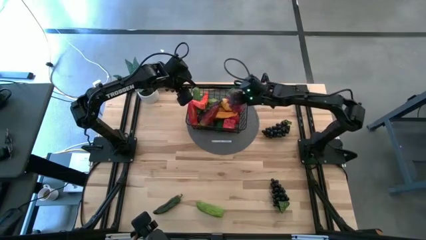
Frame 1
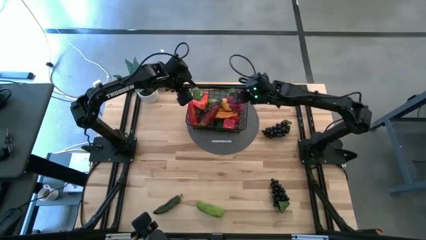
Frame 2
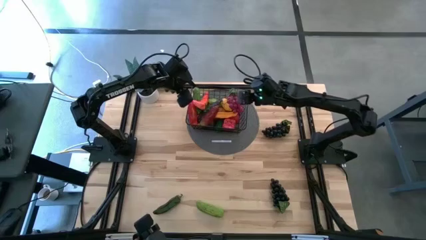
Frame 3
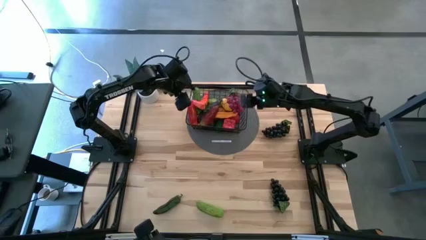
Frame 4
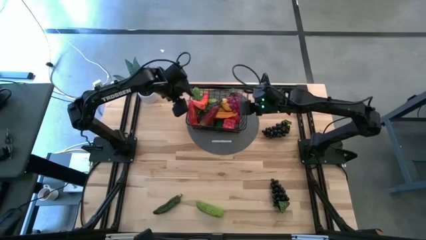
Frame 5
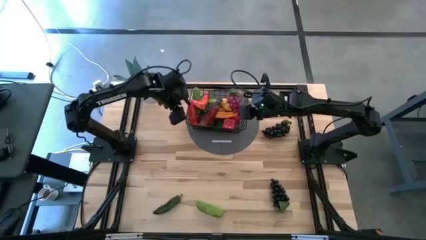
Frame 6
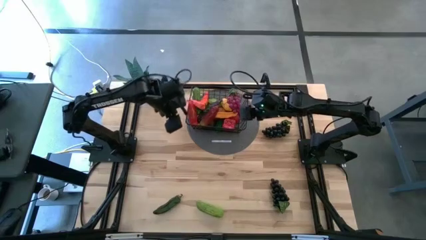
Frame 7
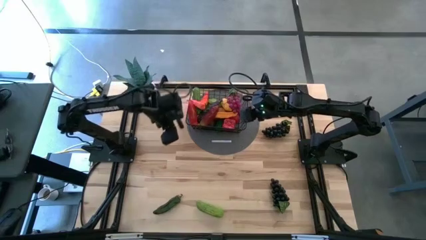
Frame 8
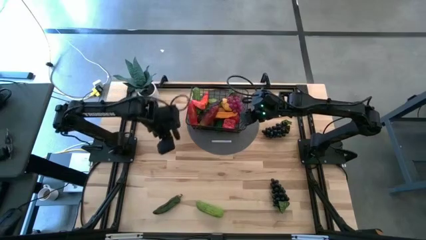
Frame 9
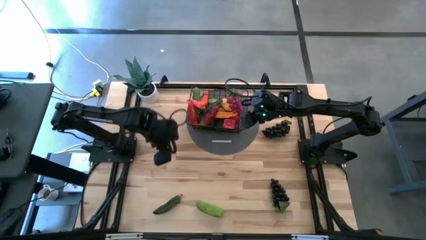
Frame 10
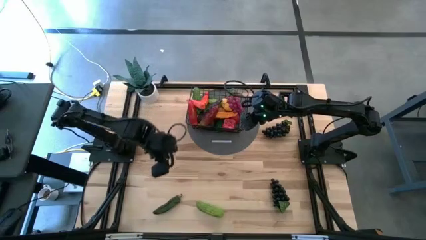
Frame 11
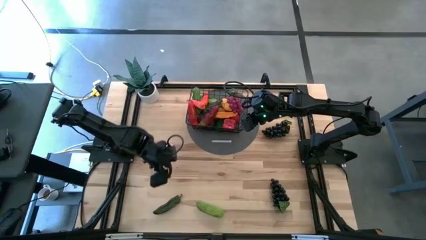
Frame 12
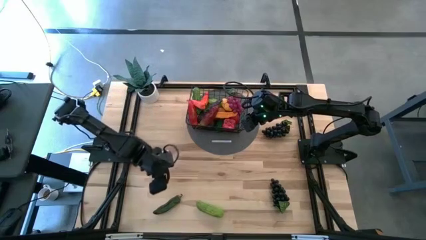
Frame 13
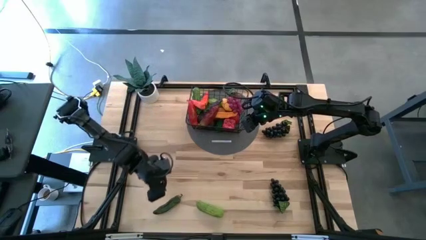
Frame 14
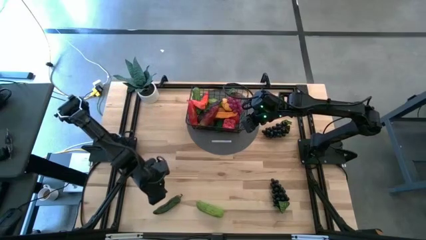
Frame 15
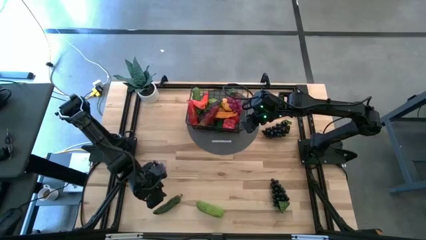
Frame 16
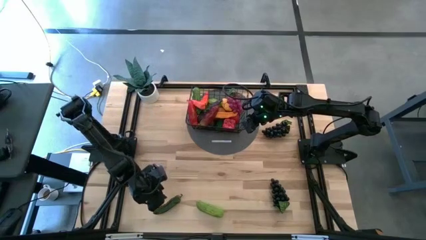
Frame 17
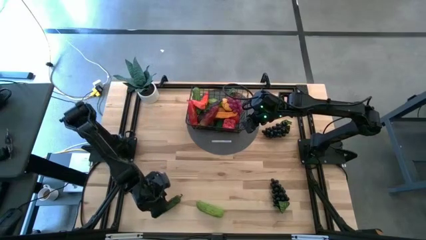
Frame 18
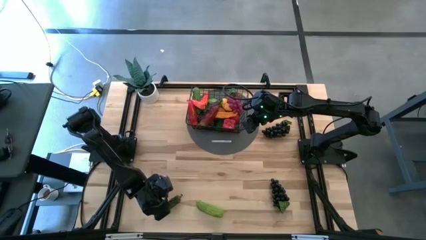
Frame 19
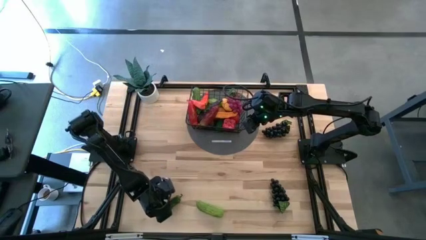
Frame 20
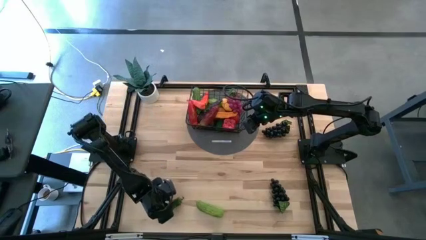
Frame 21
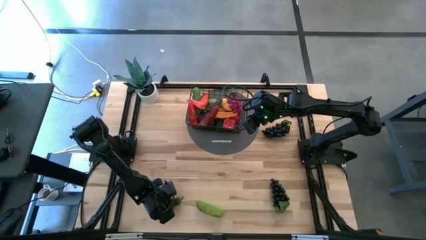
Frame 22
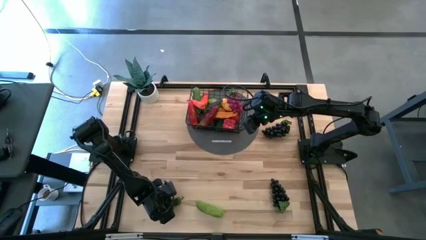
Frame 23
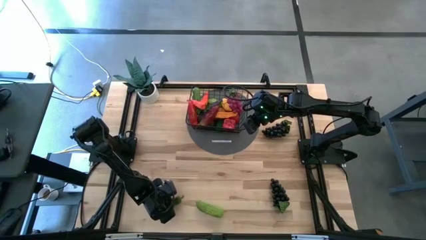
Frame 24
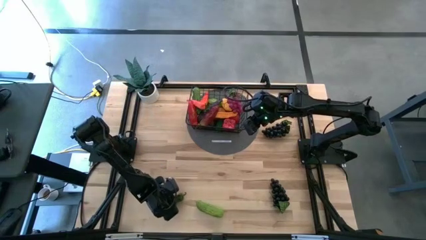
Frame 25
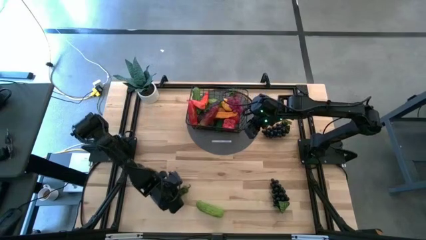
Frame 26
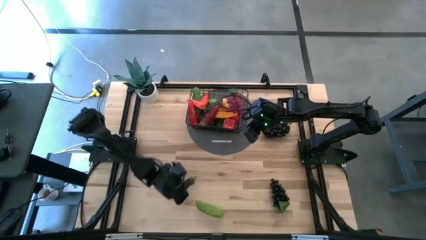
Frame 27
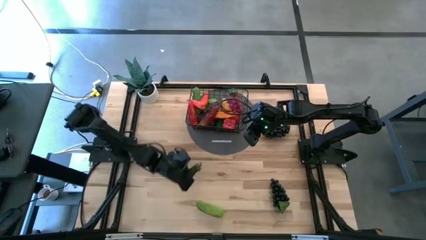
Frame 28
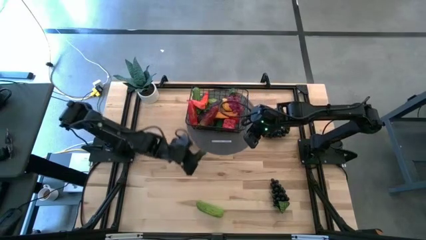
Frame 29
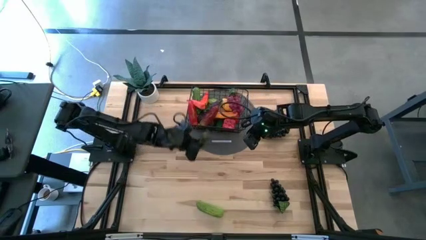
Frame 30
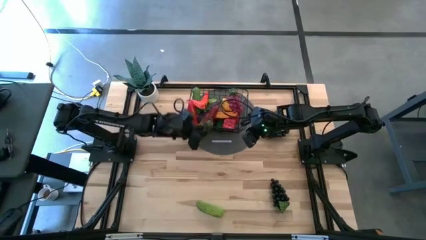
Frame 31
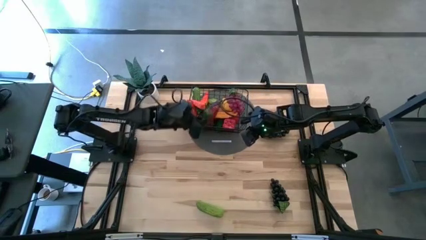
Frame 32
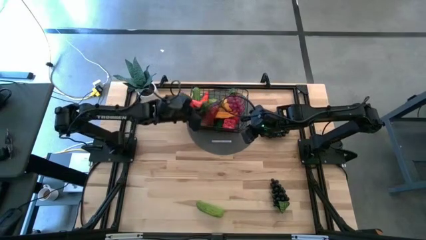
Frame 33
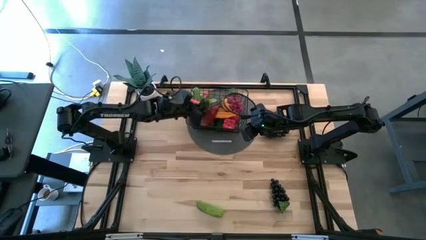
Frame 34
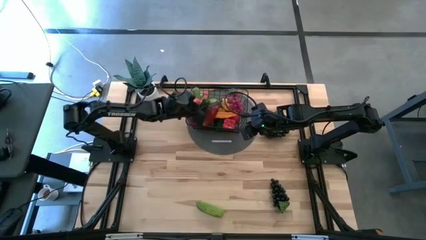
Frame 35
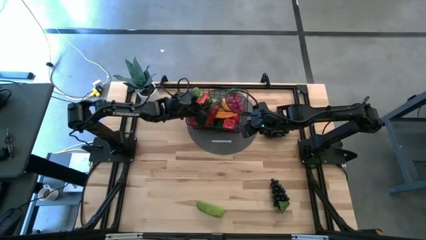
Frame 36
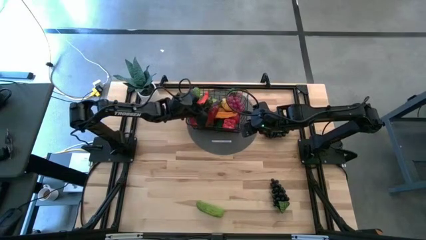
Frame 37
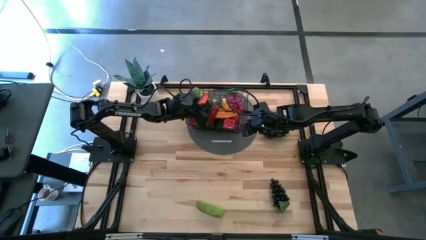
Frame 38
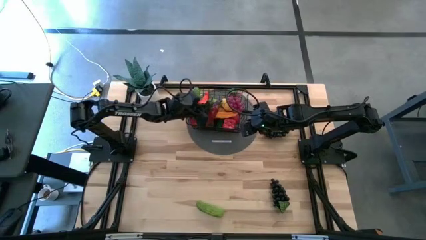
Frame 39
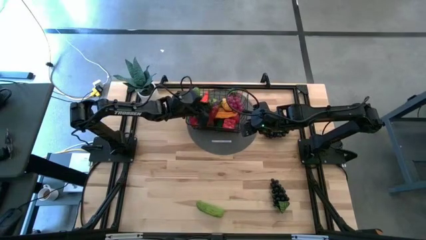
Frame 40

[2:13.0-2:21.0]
Task: Build produce basket
Put the green chili pepper into the wire basket

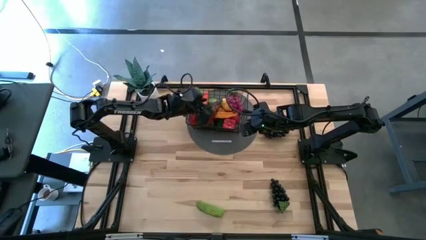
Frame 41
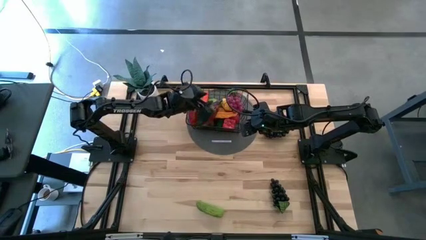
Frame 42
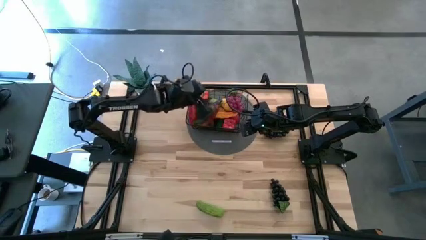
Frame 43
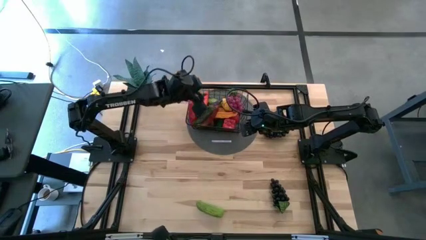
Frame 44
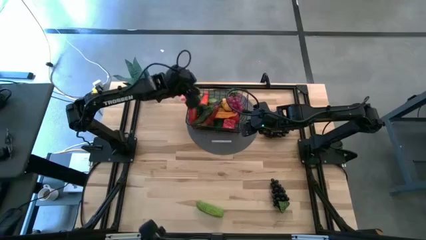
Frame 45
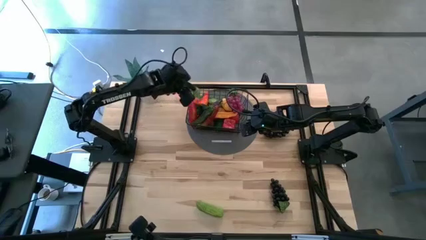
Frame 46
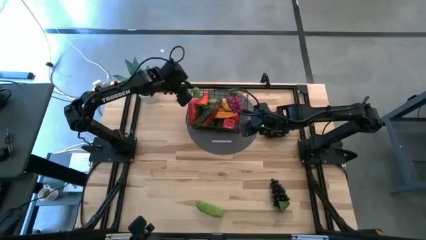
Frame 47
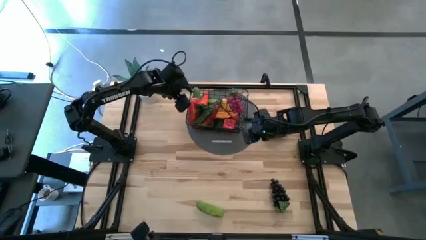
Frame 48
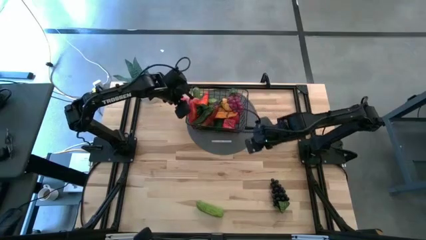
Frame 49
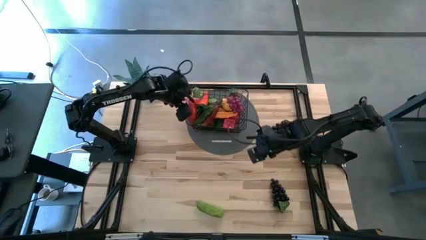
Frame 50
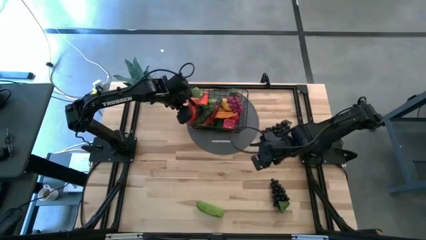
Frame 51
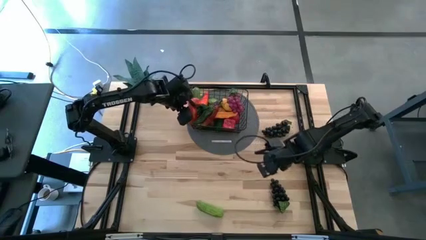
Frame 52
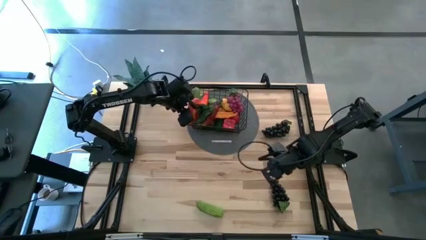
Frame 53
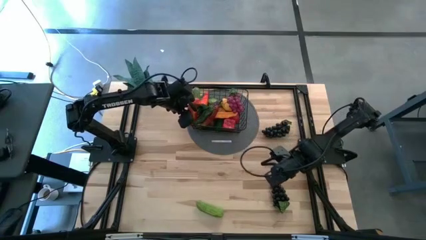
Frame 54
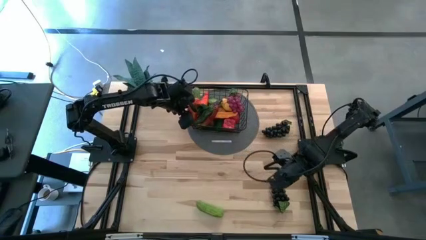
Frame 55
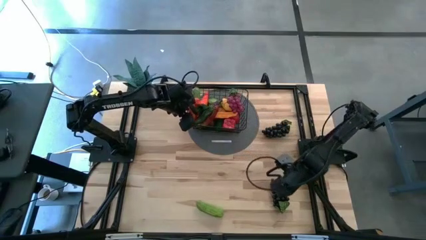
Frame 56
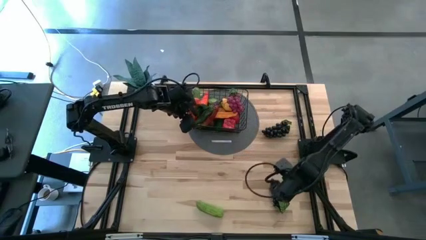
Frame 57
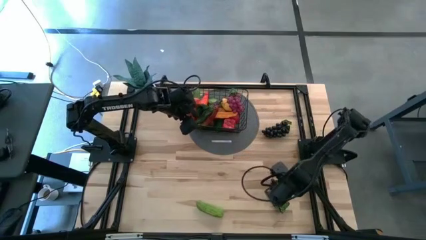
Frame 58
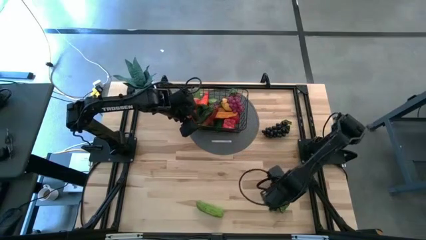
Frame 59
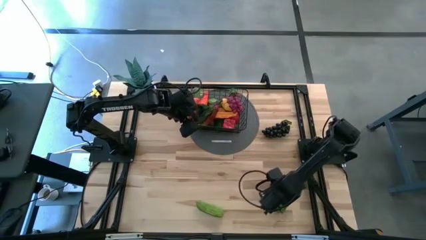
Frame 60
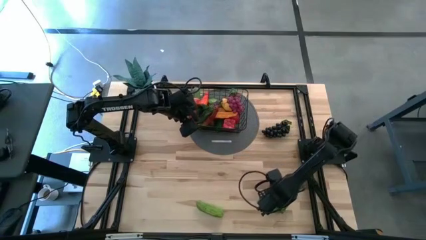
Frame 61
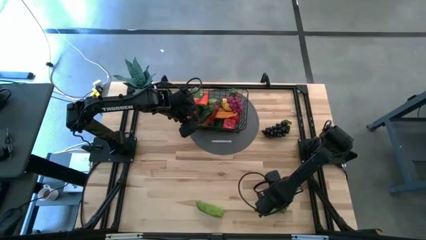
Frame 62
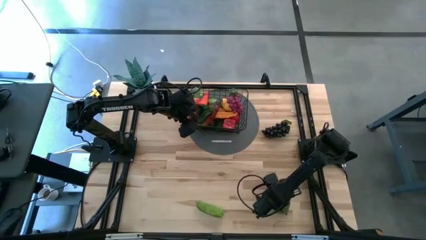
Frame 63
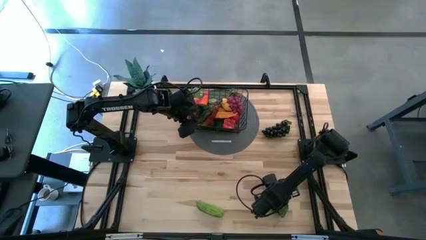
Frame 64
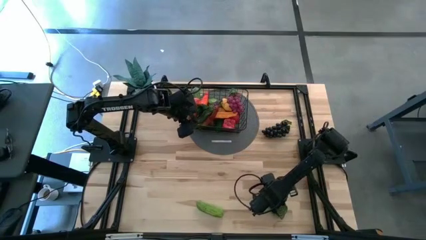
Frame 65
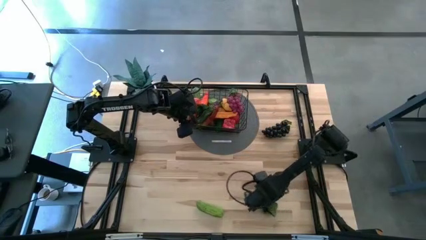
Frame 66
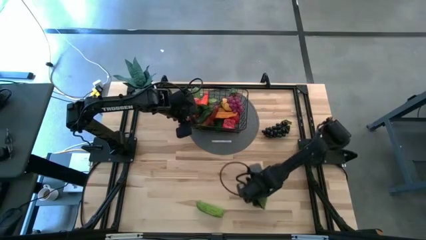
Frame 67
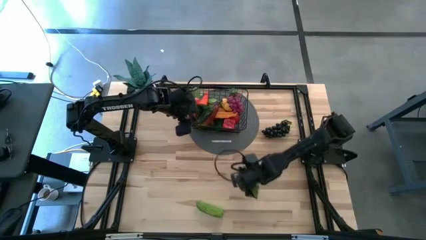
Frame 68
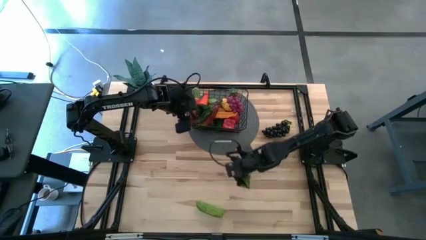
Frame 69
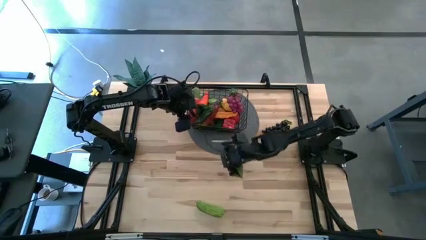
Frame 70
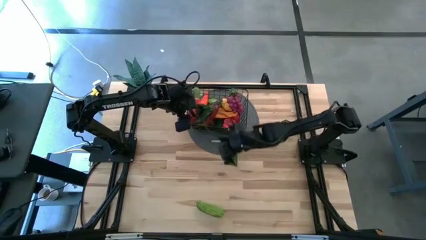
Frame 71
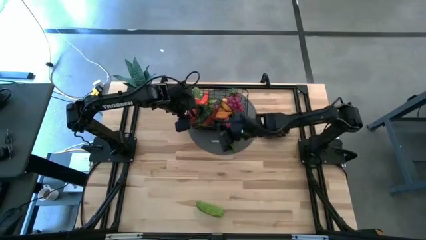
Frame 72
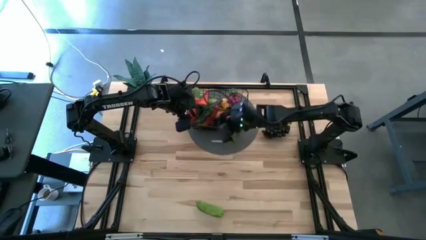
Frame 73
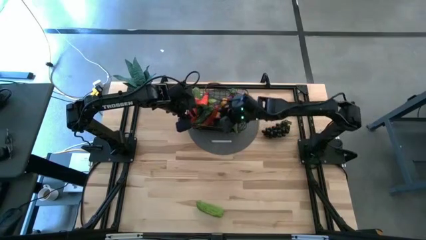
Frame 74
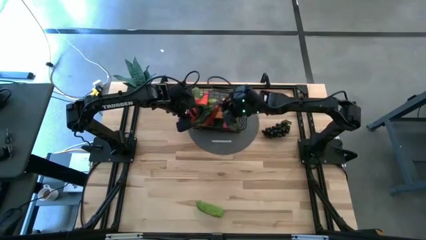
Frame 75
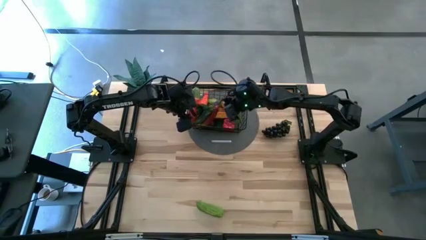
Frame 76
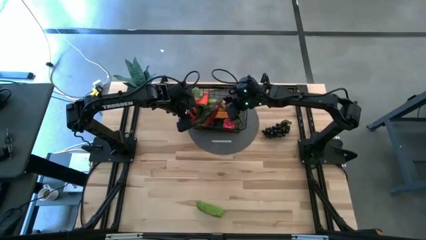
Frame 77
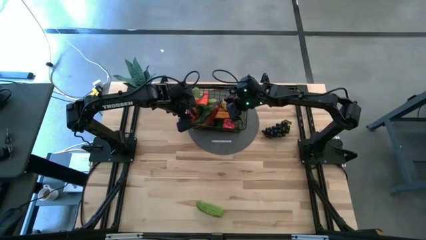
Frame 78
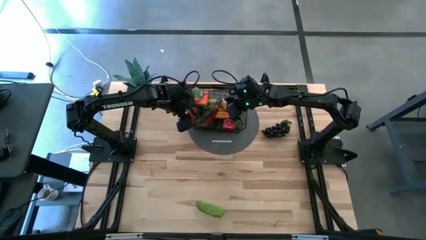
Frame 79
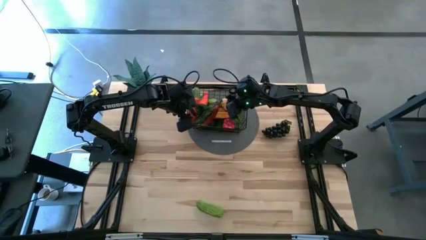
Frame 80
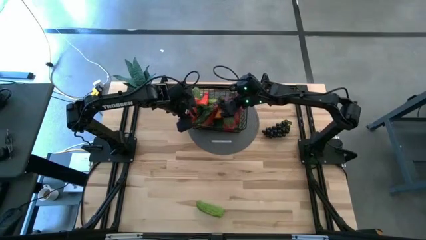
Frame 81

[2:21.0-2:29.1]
Put the bottom black grapes into the wire basket
